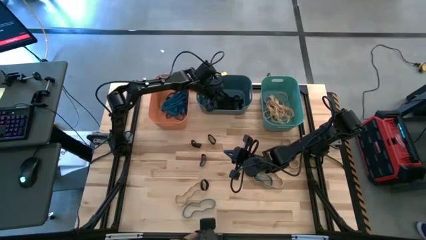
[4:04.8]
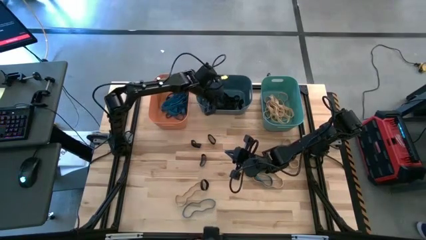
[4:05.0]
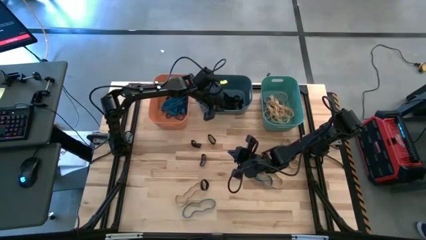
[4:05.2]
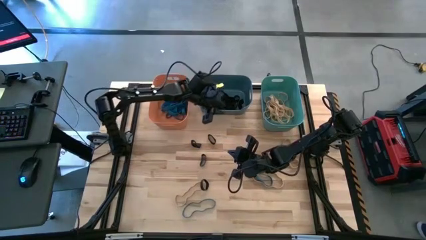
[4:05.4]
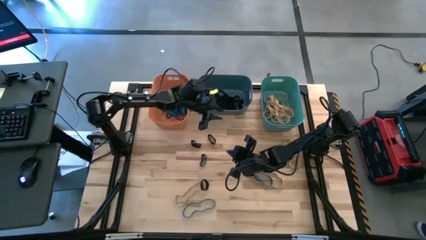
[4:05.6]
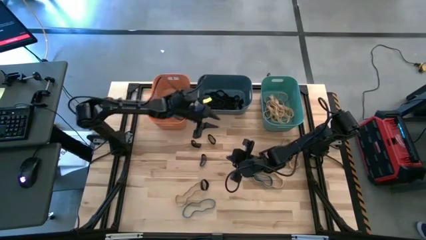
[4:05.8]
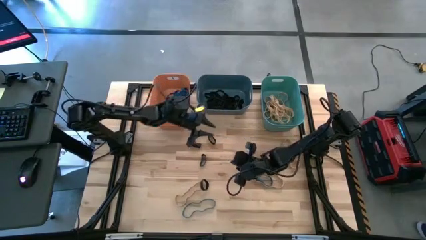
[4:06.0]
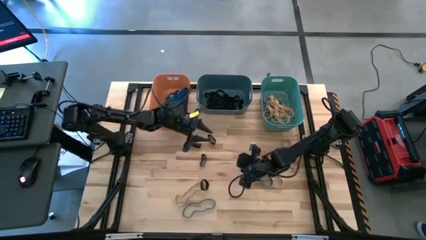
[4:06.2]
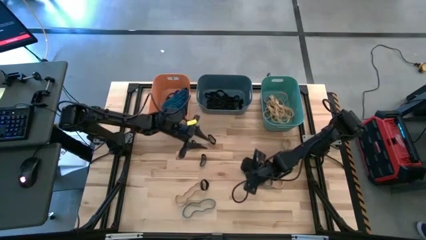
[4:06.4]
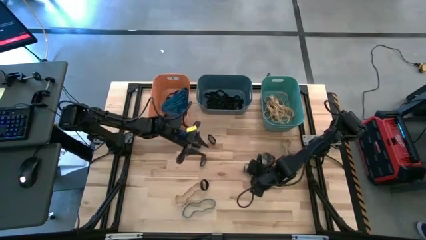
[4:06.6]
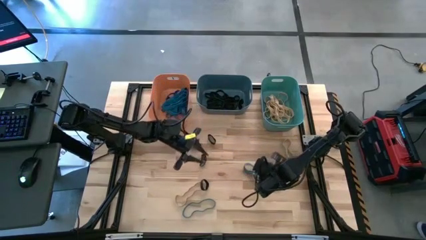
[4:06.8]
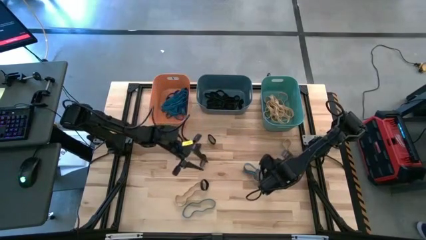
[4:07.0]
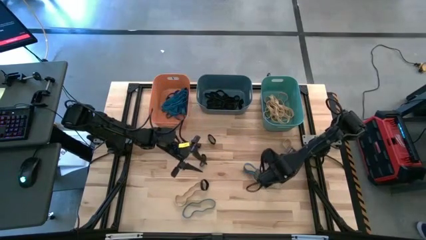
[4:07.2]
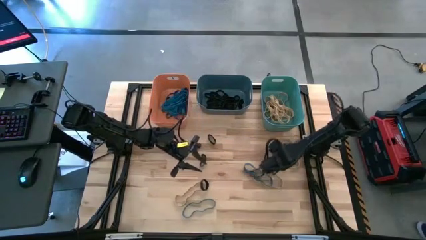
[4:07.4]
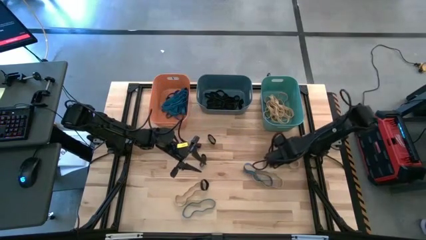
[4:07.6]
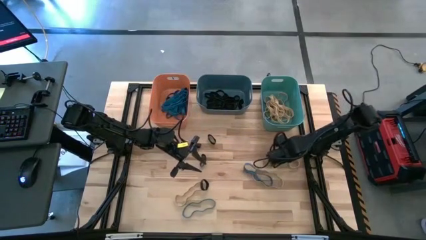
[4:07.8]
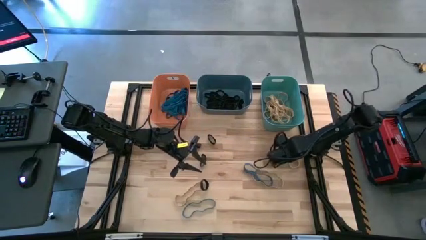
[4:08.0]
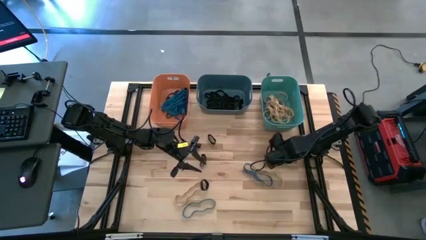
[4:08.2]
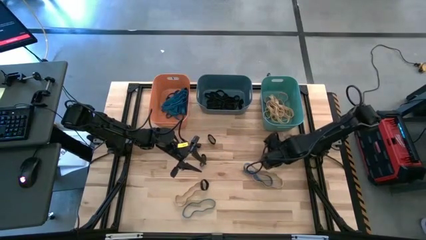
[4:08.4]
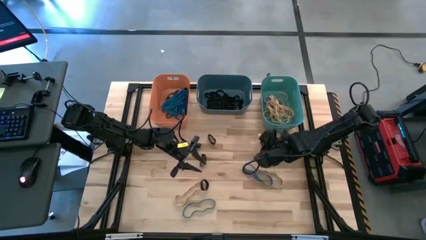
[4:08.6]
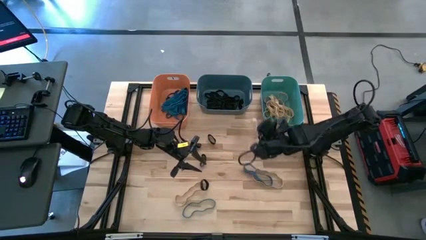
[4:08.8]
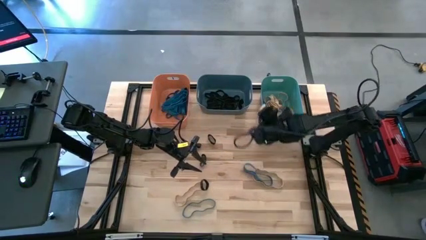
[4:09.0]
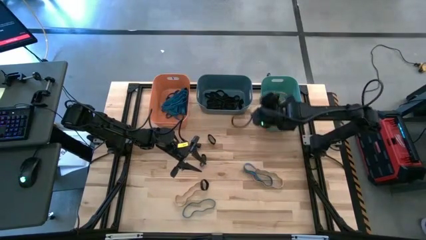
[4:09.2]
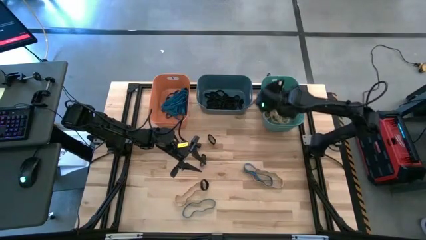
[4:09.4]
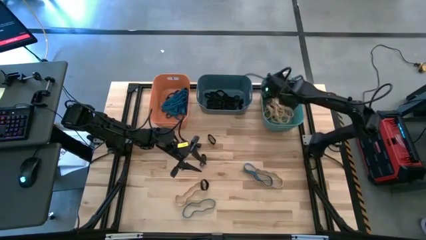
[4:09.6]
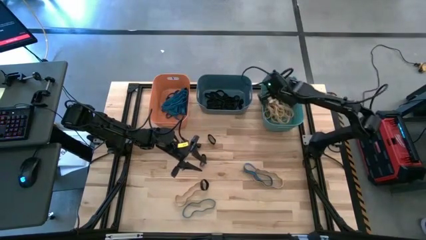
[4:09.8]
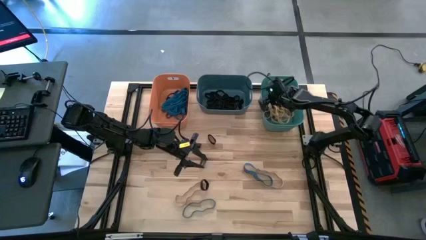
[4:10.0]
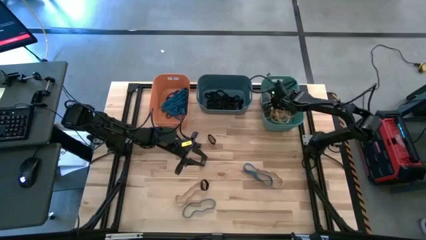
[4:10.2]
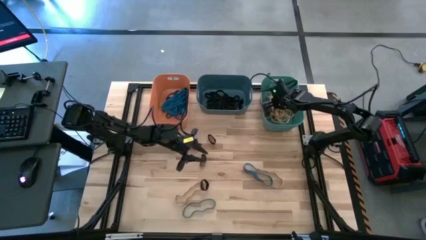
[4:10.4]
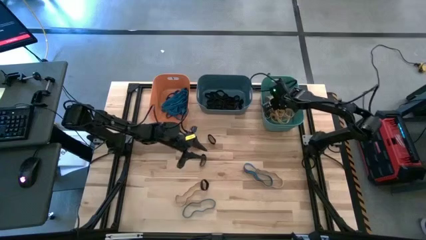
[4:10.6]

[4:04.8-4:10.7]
Task: Sort rubber bands into baskets
Put the brown rubber band into the green bin

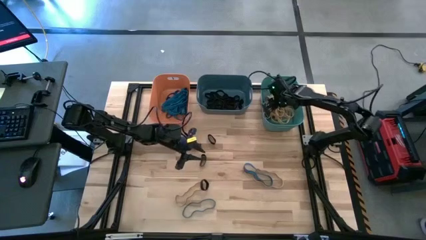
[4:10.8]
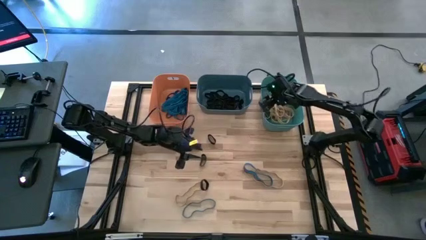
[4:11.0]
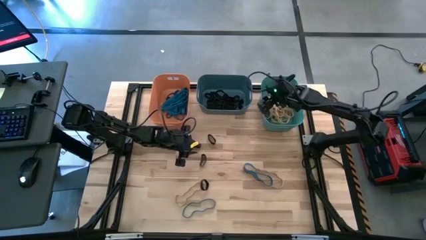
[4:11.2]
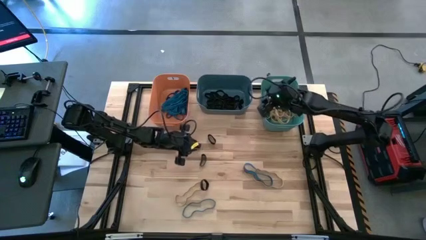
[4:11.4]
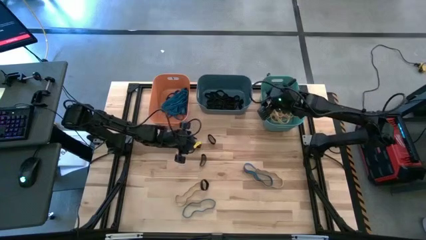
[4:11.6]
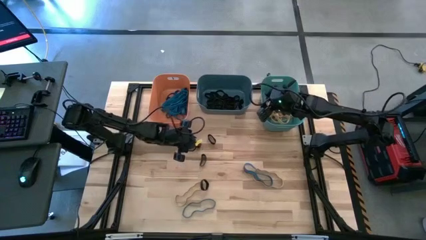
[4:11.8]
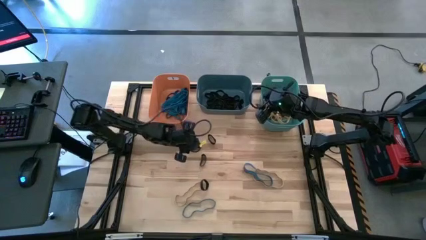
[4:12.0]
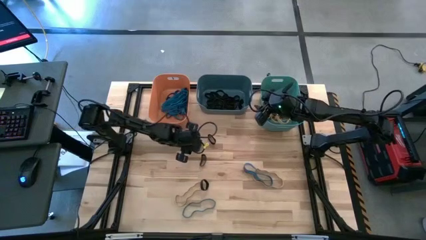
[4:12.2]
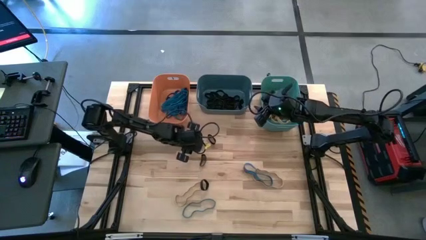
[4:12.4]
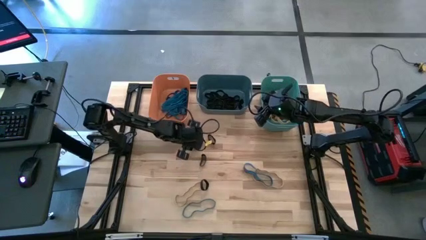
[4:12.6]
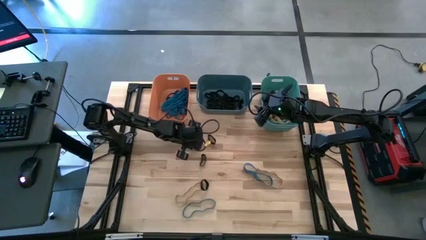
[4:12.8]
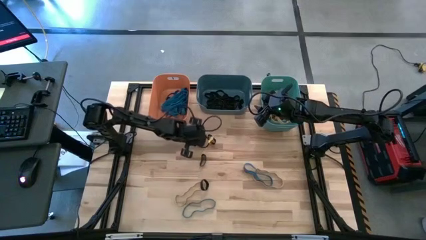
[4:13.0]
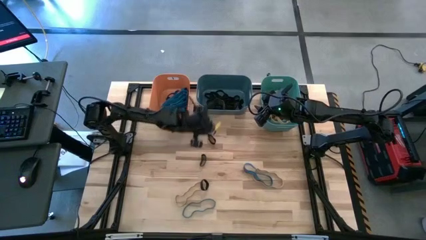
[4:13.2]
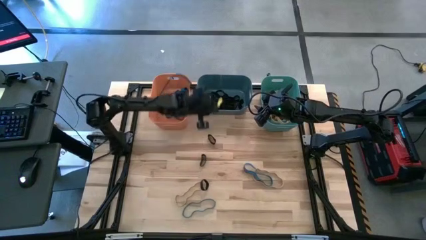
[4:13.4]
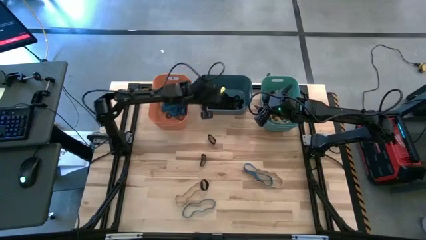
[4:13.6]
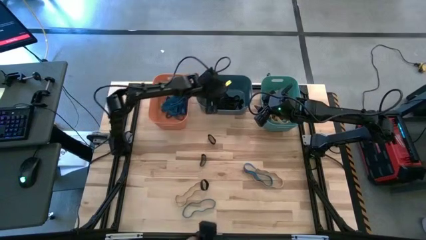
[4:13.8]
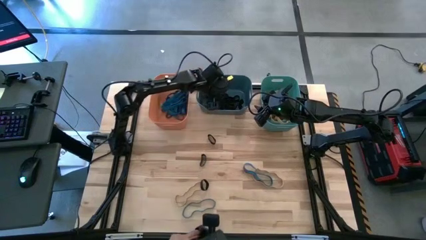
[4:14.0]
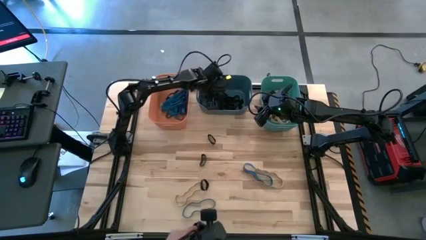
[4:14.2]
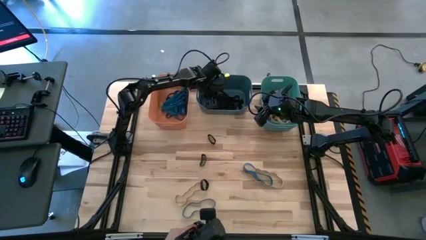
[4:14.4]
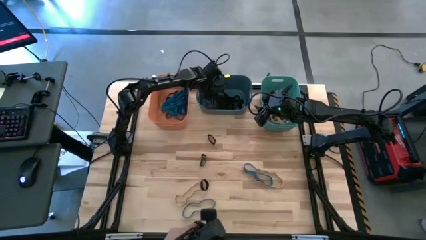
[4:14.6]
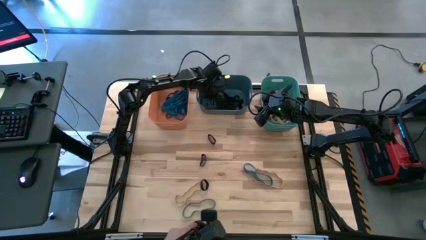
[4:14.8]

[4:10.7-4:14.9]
Put the black rubber band into the blue bin

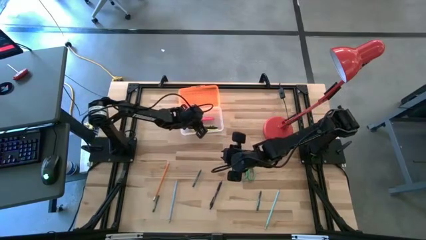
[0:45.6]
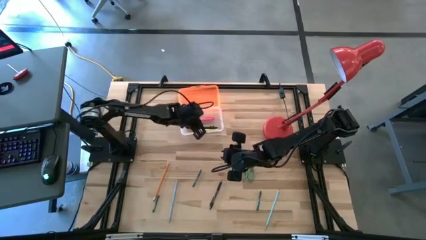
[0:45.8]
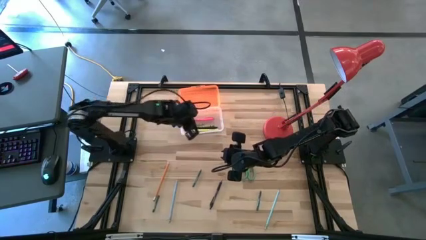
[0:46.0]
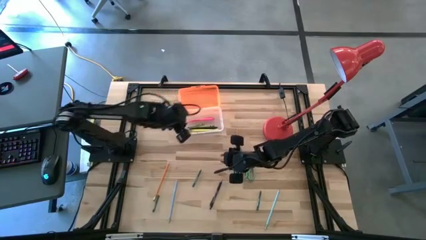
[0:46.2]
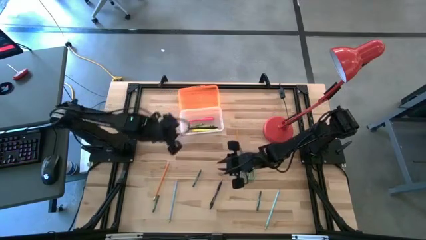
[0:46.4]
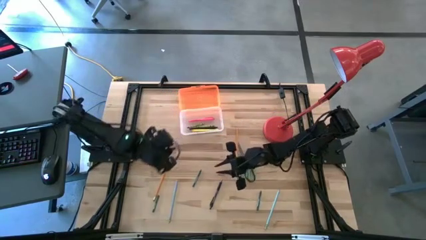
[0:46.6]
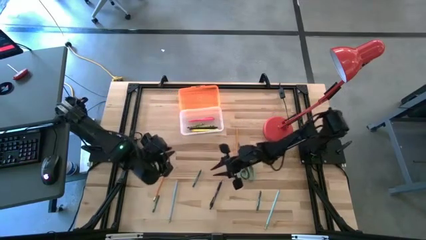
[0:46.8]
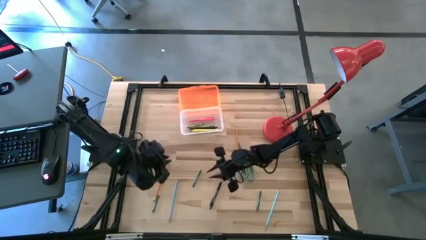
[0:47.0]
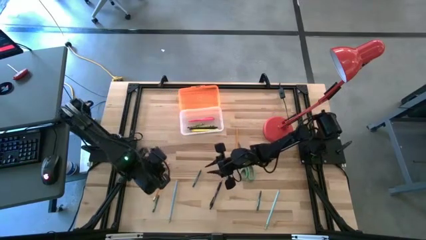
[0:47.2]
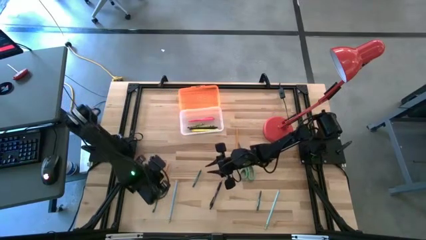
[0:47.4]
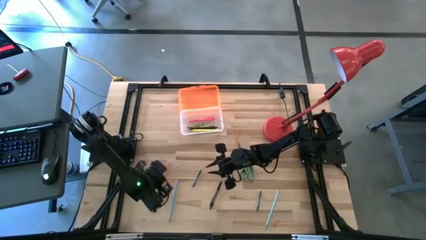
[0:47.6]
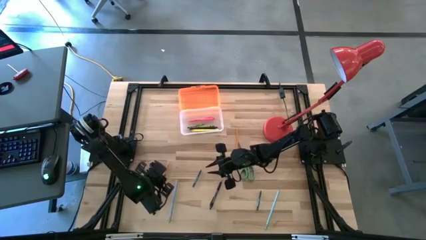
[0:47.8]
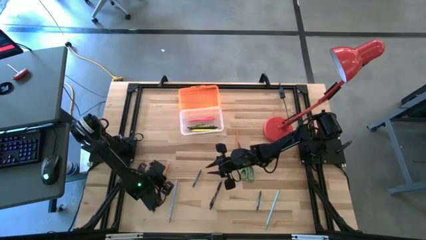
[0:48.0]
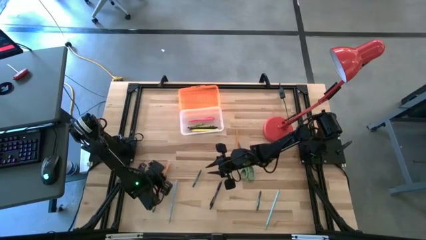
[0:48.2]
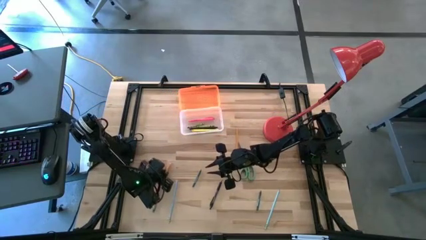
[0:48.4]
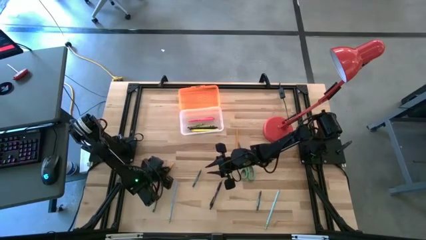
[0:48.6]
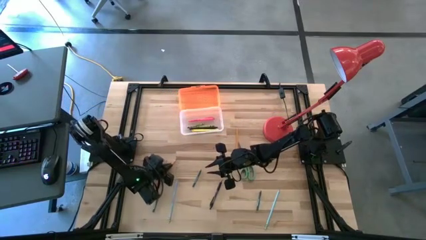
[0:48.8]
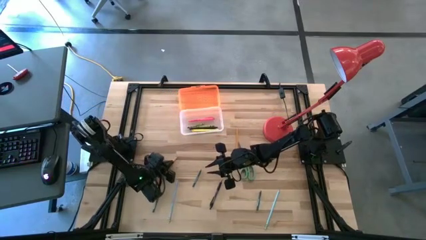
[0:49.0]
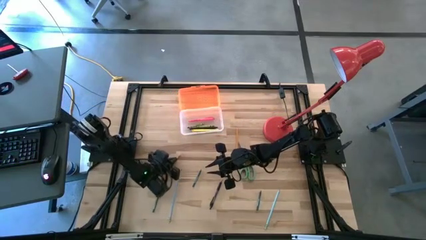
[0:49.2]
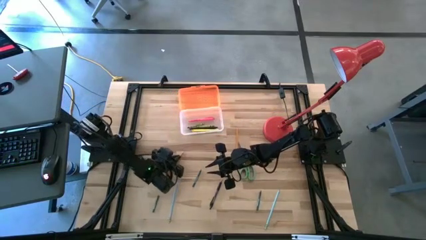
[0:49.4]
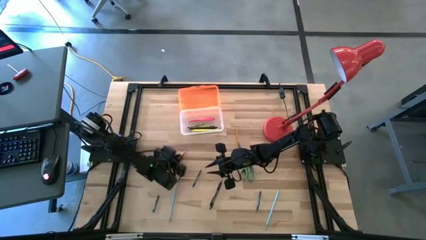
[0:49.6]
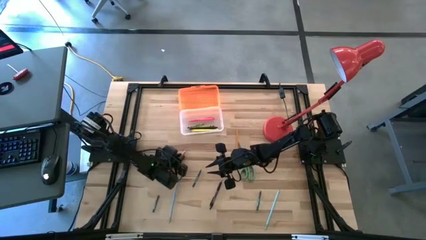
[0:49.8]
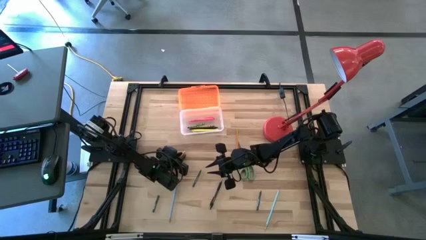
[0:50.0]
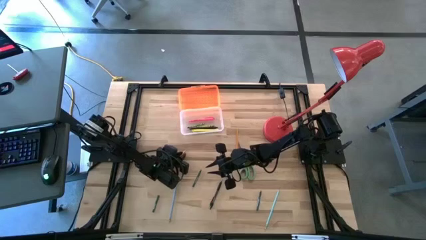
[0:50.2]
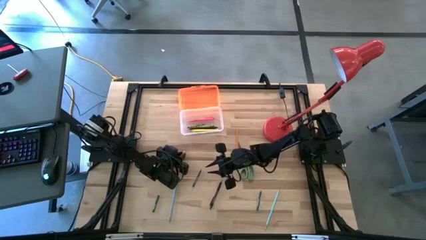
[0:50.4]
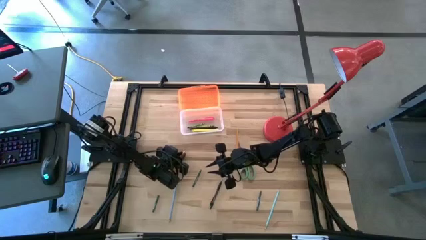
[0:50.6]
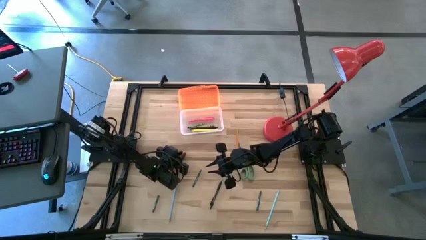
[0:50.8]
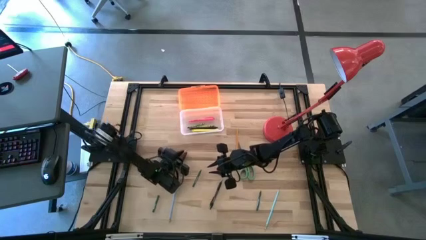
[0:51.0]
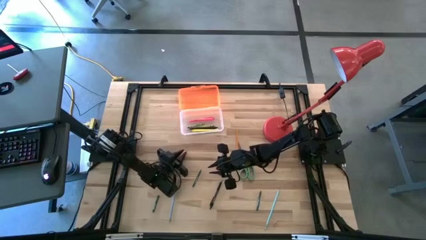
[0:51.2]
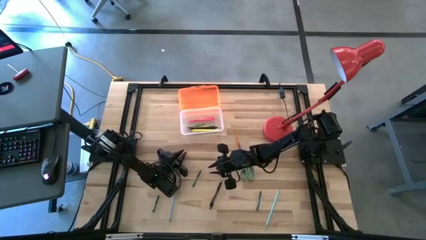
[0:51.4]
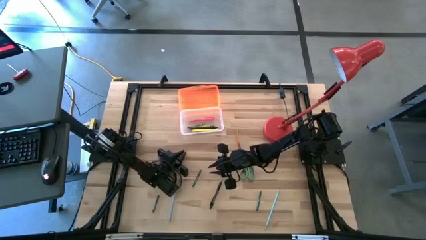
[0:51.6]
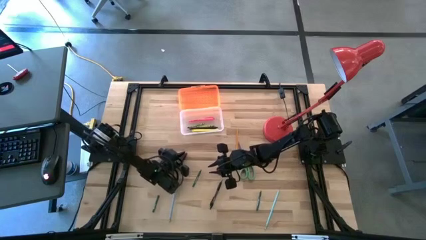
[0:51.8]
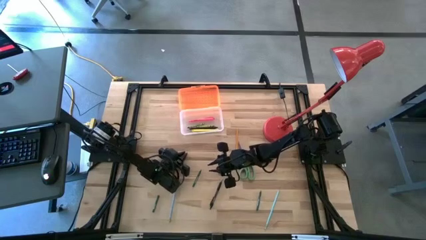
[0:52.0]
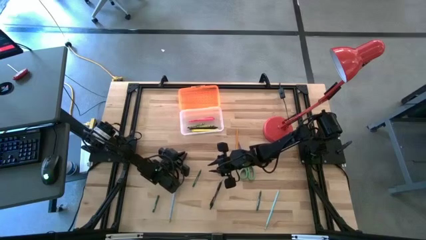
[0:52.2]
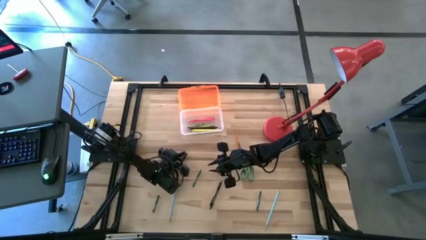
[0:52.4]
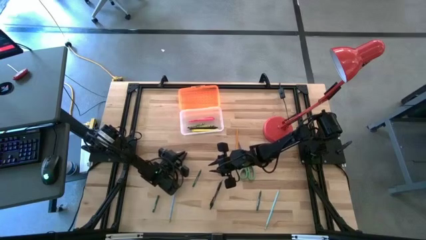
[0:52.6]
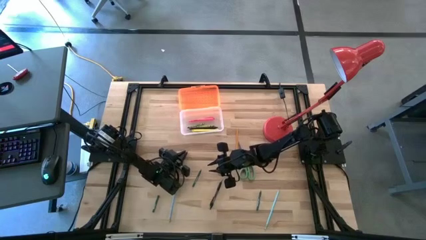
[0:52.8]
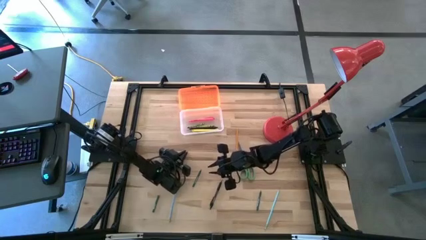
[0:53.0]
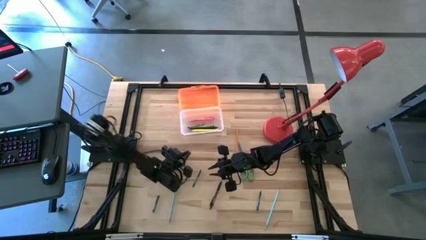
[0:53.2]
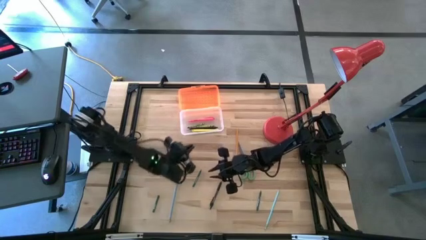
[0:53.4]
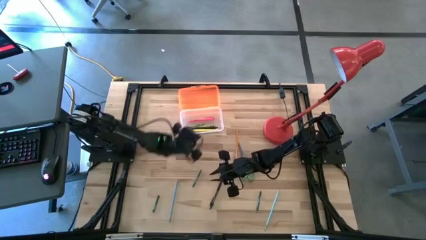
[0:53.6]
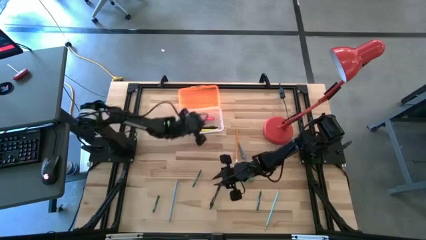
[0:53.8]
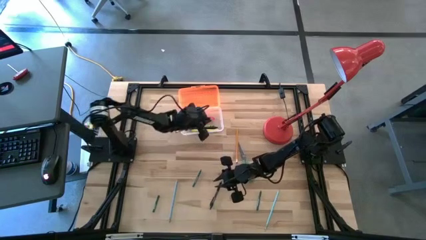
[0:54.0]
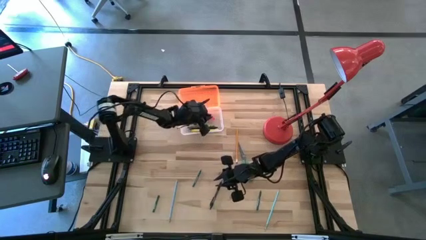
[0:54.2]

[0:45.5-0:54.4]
Task: Pick & place school supplies into a supply box
Put the bottom orange pencil into the orange supply box
